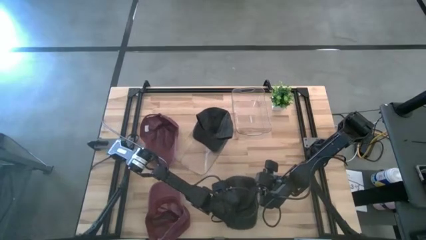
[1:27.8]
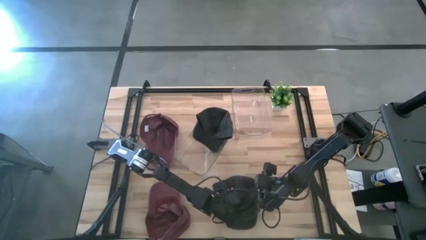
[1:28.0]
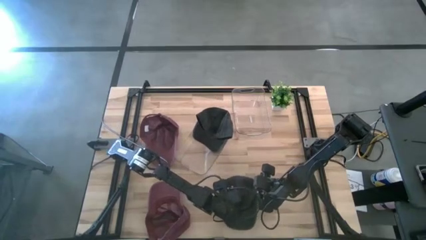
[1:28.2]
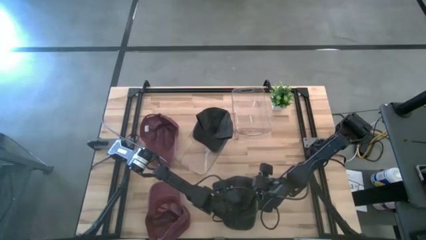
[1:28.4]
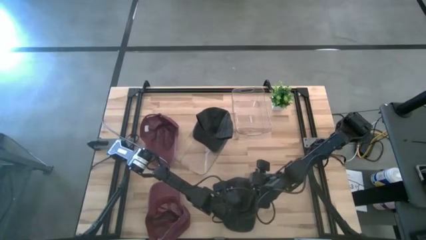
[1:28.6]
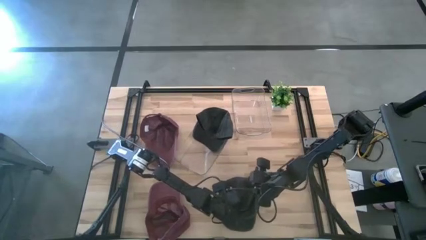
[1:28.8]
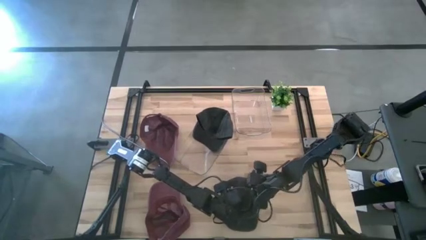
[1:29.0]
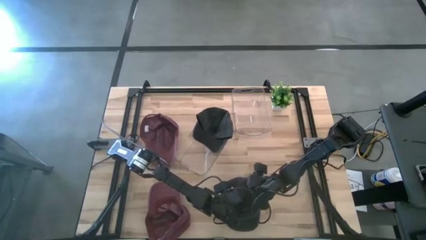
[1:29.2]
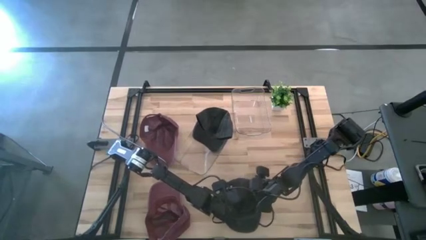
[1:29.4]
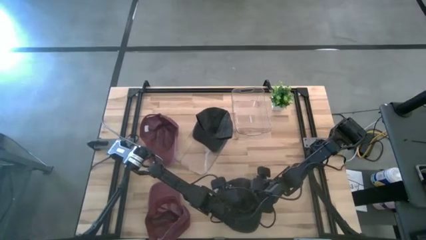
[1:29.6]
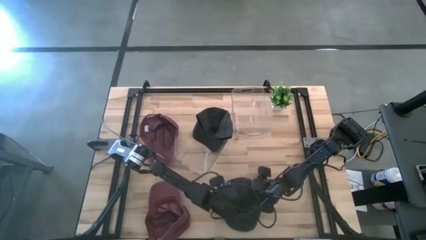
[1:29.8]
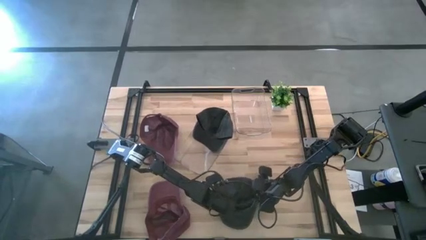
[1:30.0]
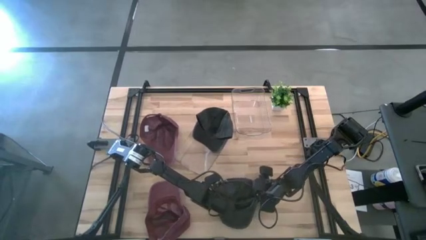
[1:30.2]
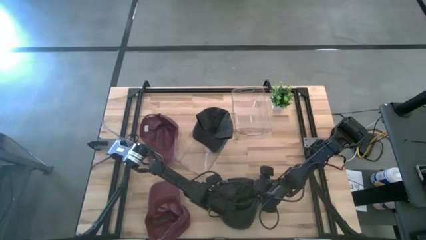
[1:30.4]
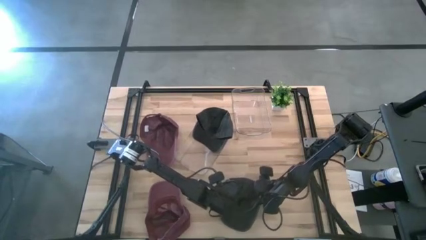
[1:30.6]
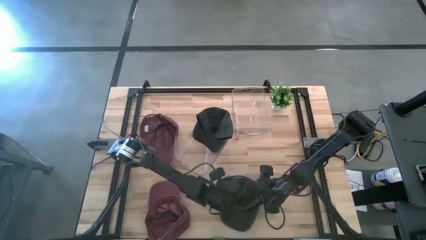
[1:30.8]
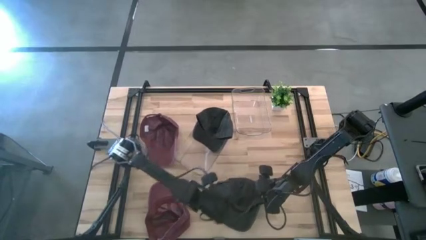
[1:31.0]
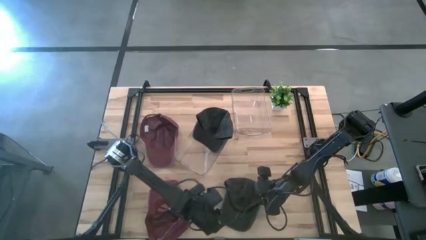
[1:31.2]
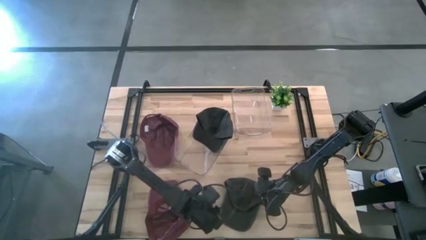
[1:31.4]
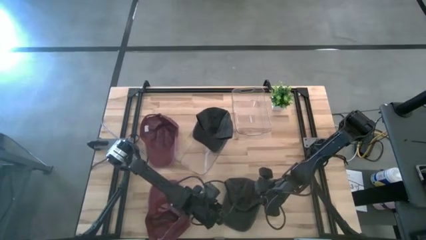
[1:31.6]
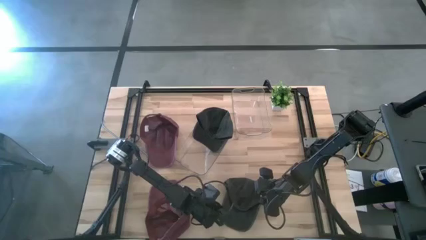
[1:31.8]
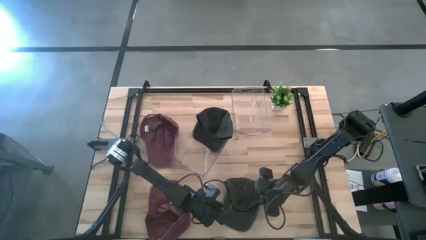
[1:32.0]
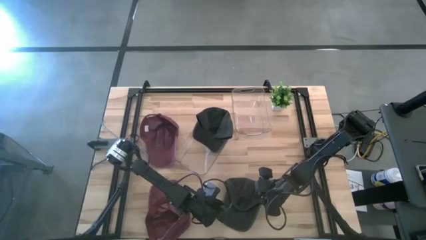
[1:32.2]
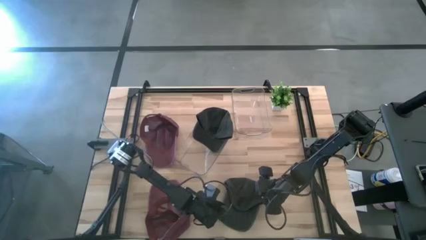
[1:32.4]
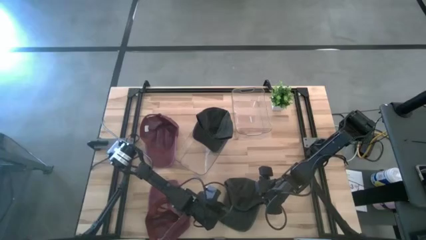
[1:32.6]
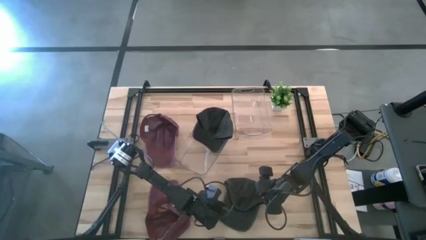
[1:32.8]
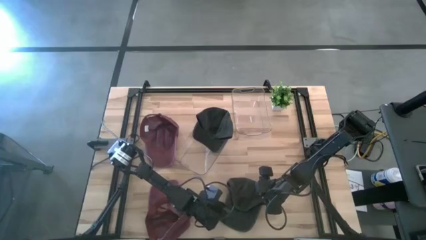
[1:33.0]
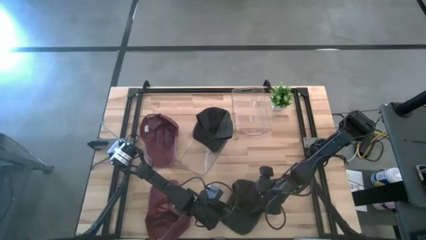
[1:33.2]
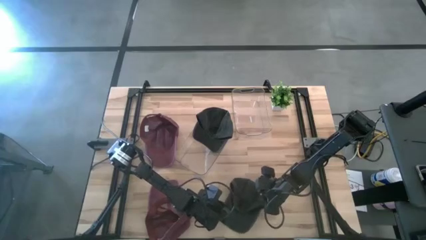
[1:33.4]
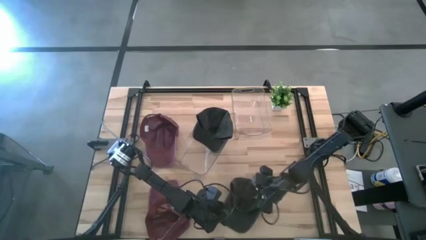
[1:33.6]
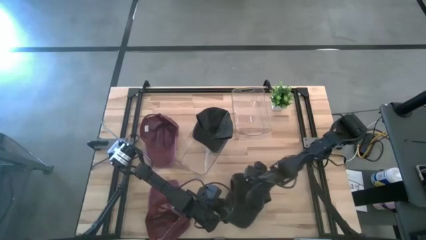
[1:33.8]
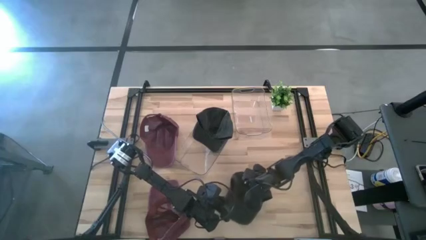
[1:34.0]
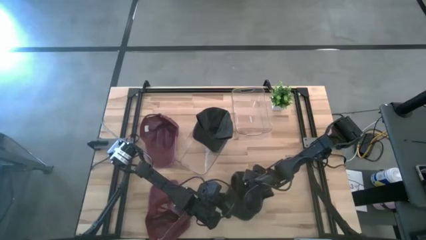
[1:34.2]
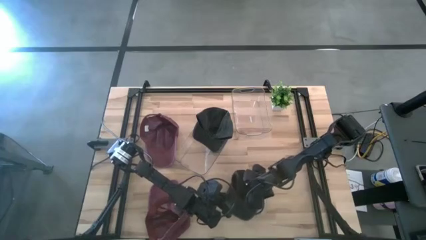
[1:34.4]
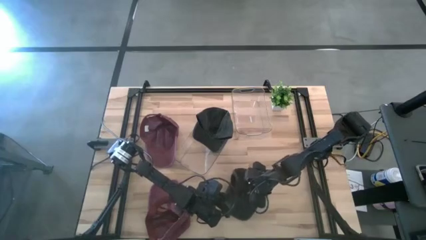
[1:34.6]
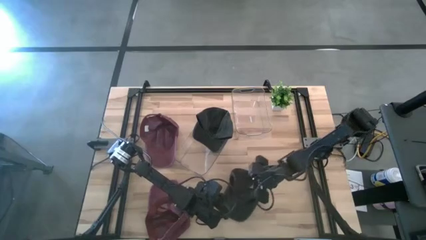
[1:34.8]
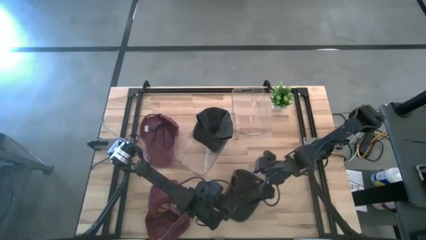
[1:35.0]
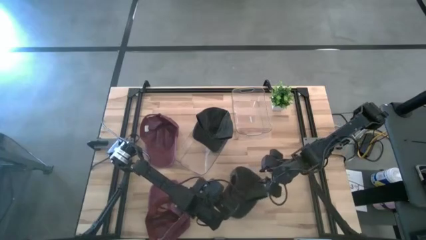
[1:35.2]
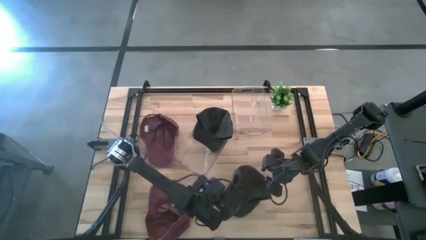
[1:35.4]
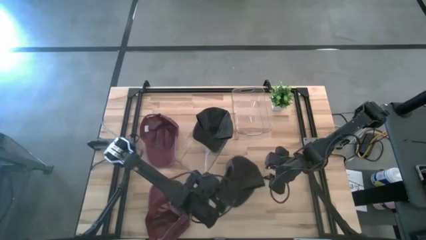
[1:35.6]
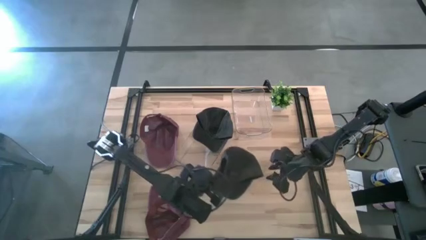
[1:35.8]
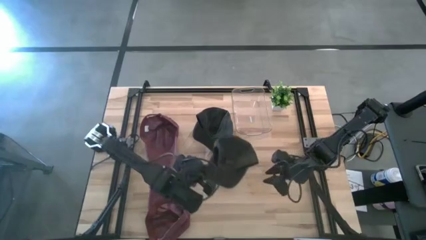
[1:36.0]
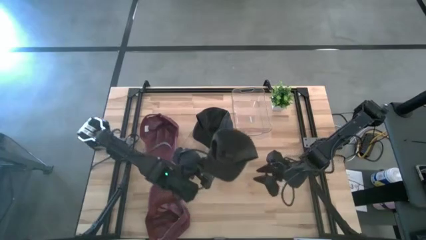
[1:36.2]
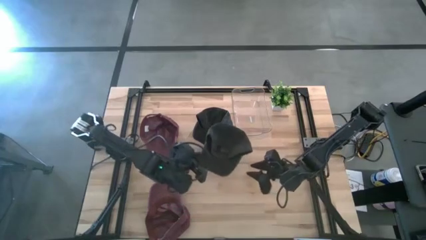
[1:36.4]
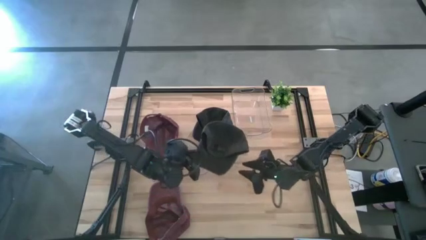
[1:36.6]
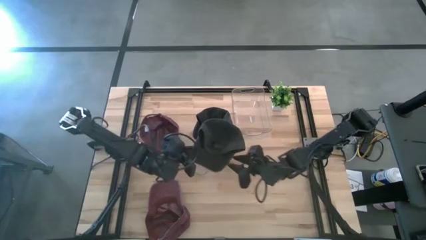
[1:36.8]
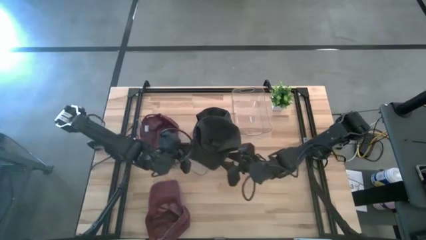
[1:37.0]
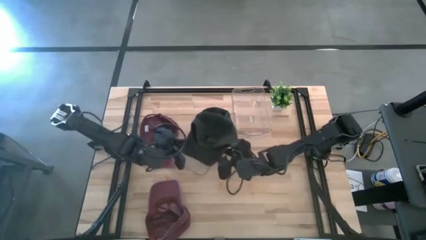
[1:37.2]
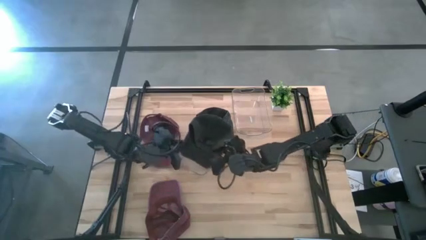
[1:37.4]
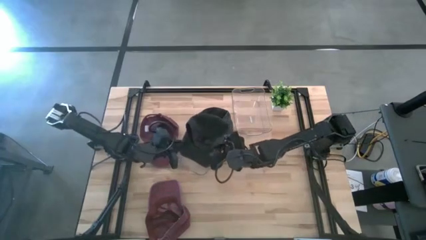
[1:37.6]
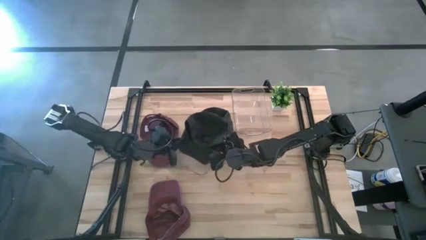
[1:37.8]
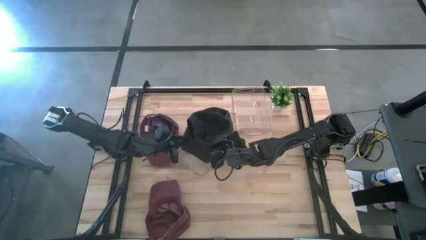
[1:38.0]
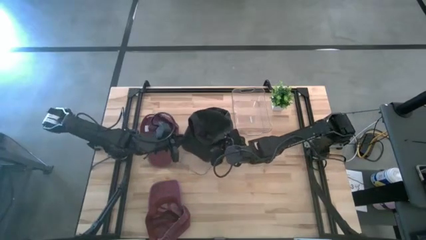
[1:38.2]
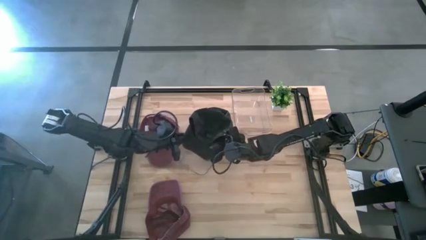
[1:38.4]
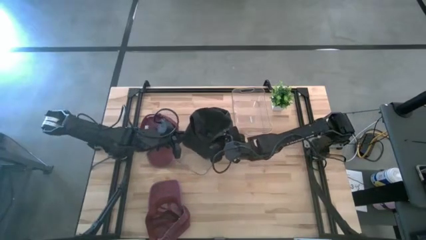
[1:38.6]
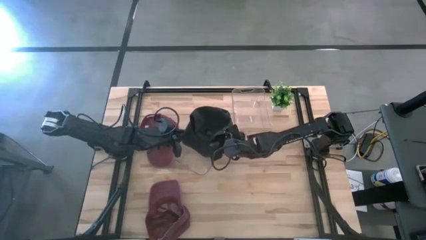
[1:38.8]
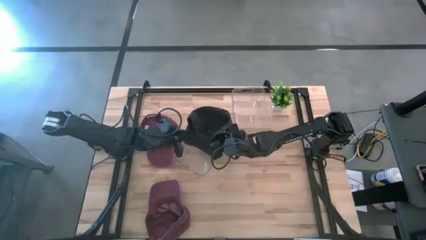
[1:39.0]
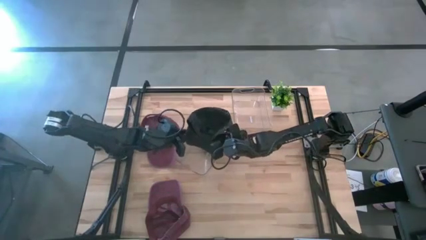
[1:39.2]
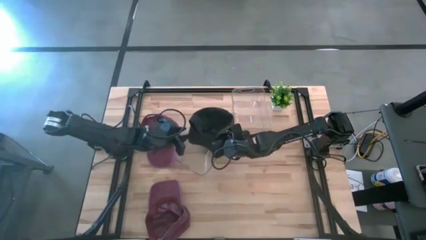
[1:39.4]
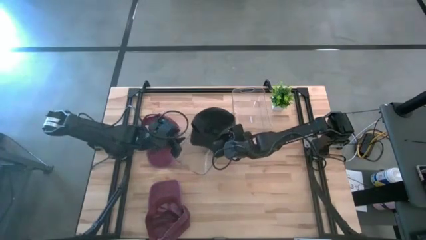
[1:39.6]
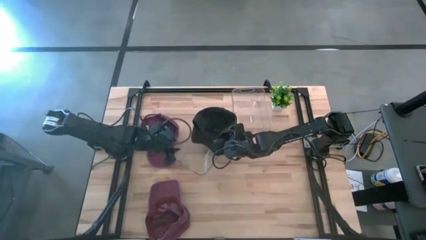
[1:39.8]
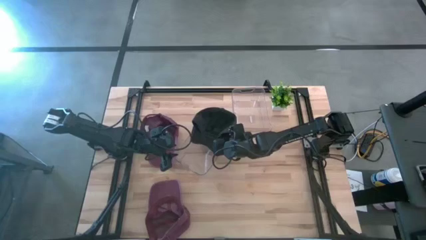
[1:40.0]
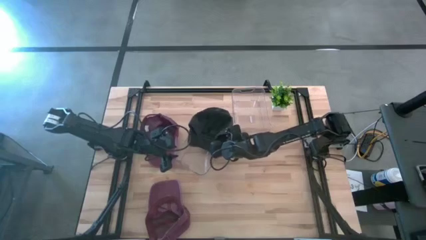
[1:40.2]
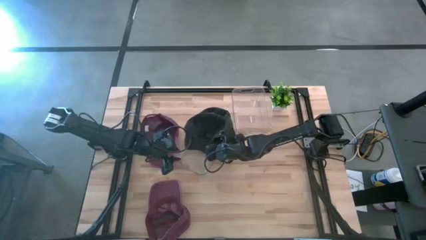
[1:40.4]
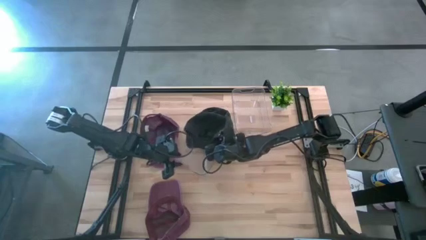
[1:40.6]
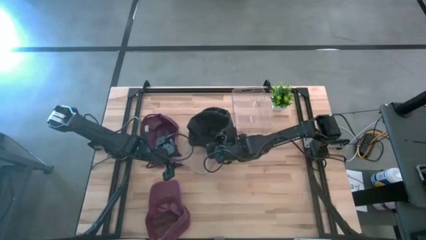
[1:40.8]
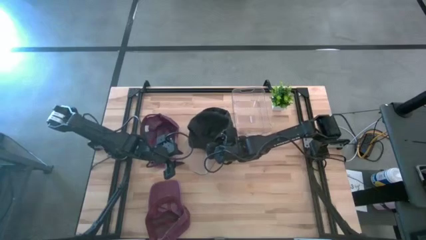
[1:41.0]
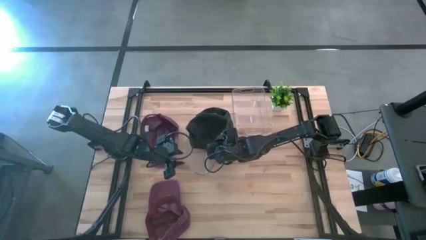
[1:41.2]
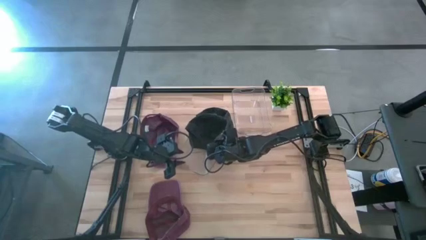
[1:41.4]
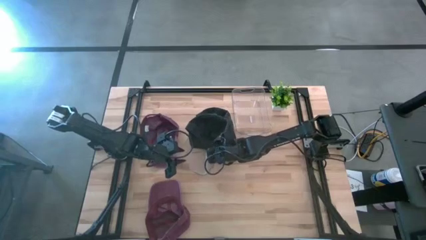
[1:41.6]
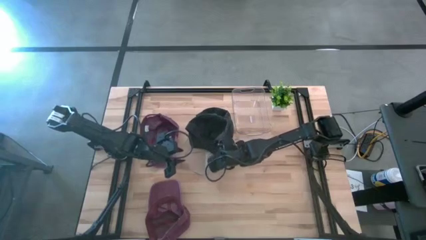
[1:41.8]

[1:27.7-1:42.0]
Task: Pick & Place hat
Put the black cap into the left transparent bin

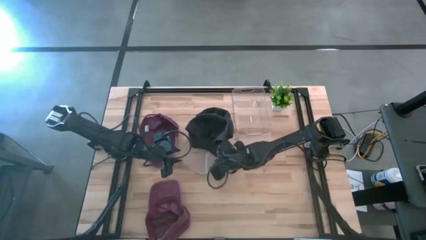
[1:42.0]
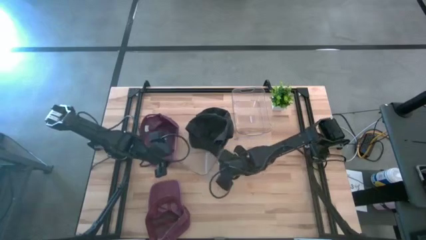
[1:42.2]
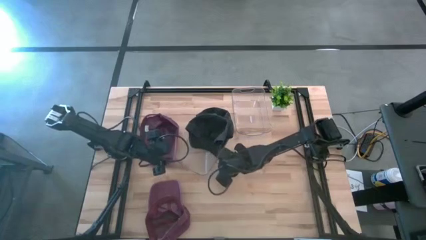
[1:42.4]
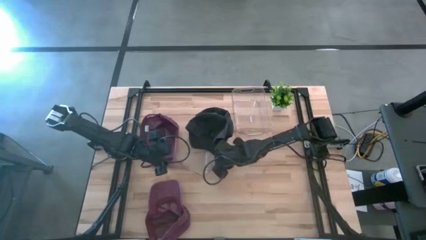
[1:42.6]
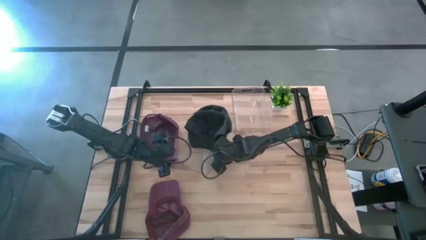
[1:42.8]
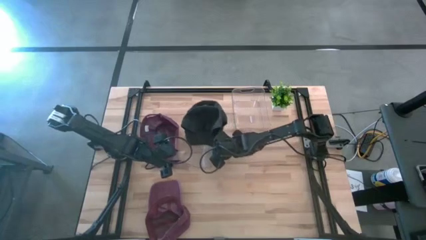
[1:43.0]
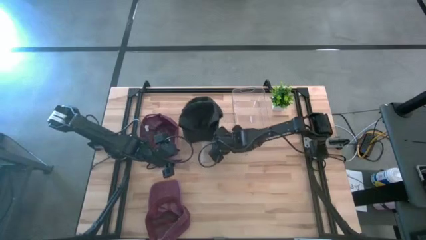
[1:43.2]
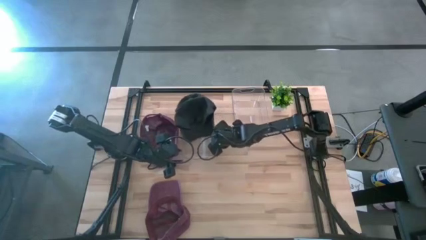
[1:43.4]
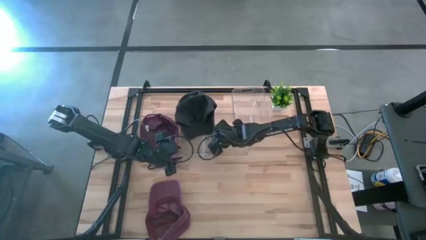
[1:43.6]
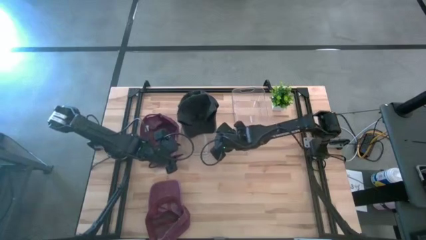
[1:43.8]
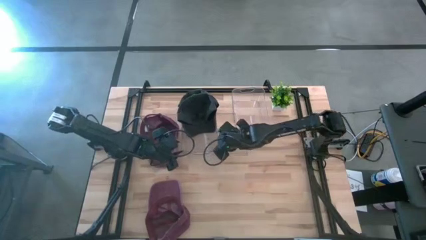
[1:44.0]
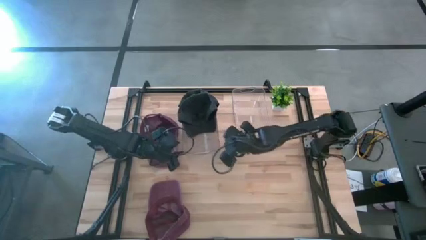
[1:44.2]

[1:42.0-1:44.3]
Adjust the left transparent bin

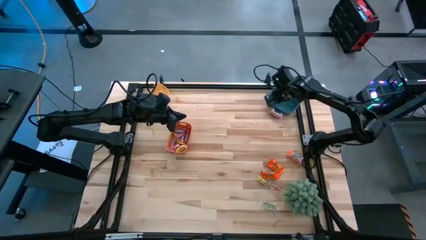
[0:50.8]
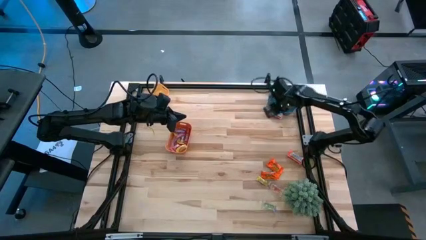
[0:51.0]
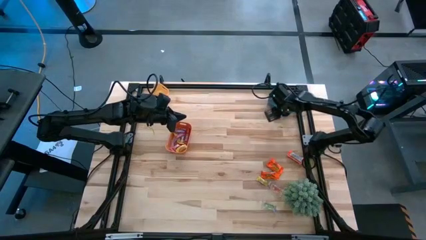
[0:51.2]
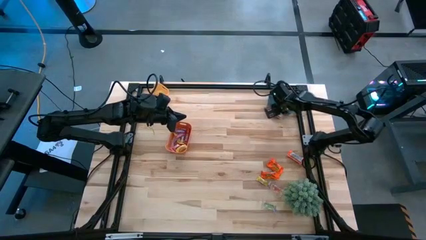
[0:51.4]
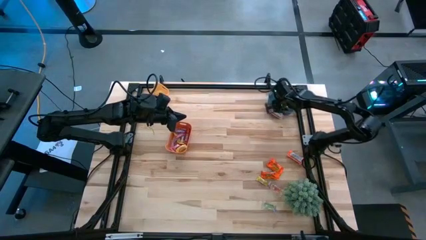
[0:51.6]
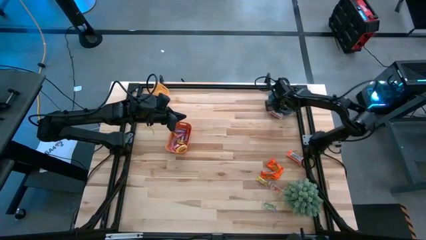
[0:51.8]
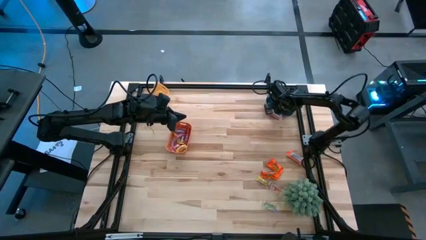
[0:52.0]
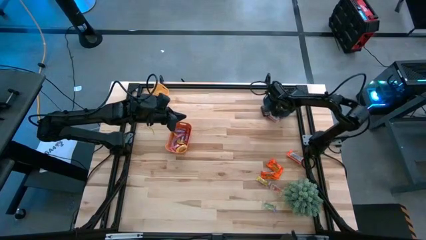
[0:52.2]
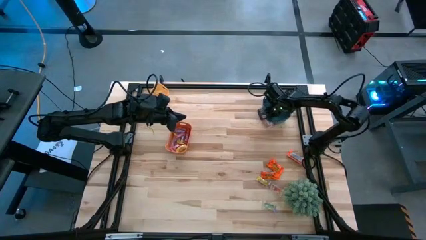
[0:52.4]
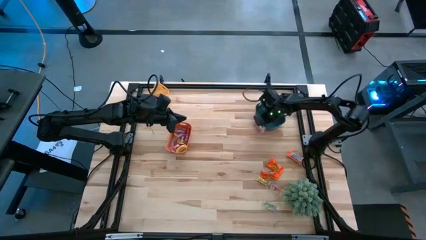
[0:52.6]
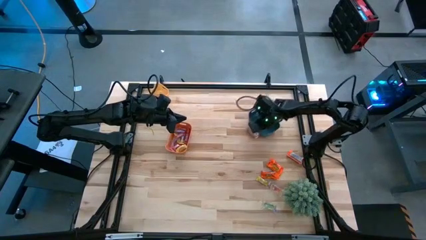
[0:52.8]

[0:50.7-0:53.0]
Task: Sort candy
Adjust the blue bin
